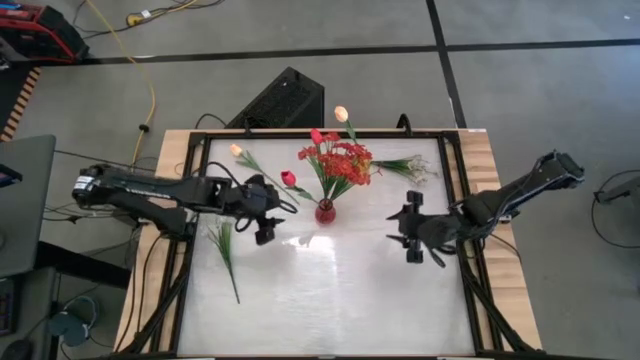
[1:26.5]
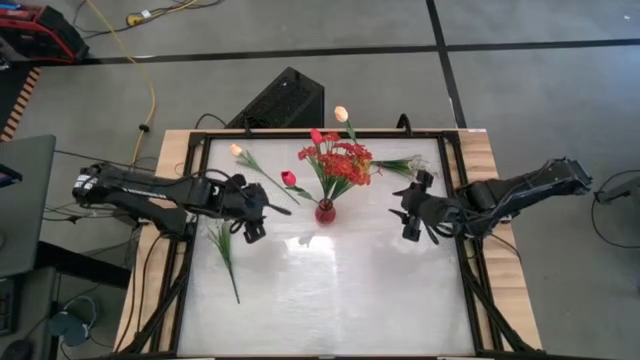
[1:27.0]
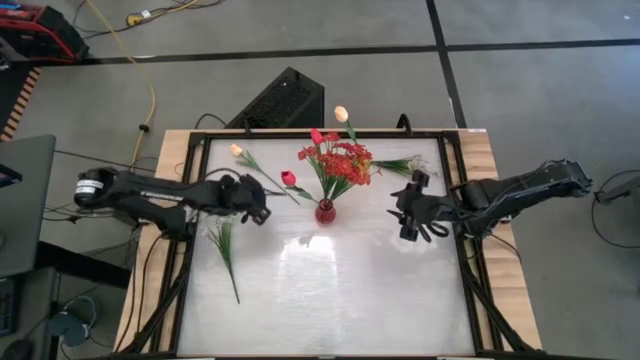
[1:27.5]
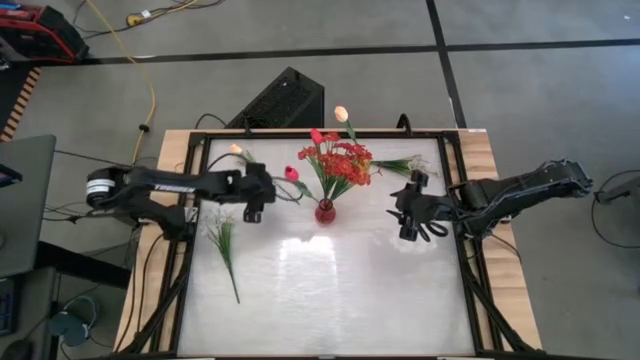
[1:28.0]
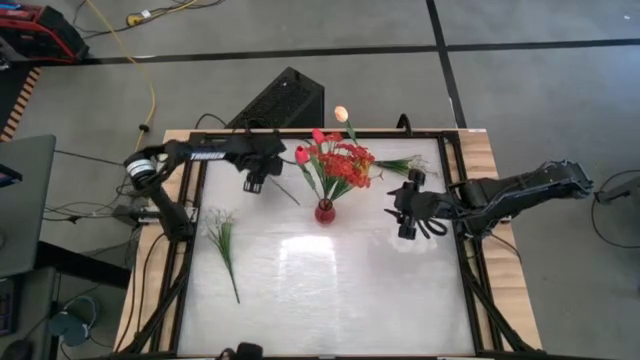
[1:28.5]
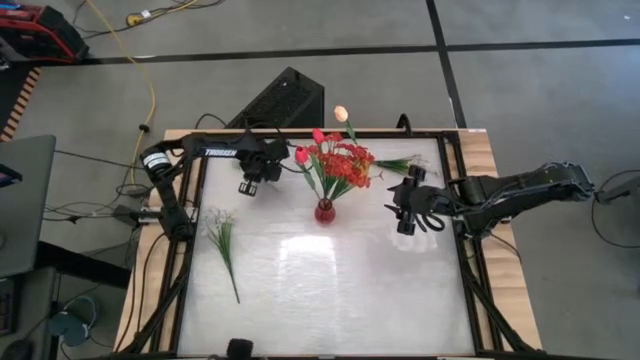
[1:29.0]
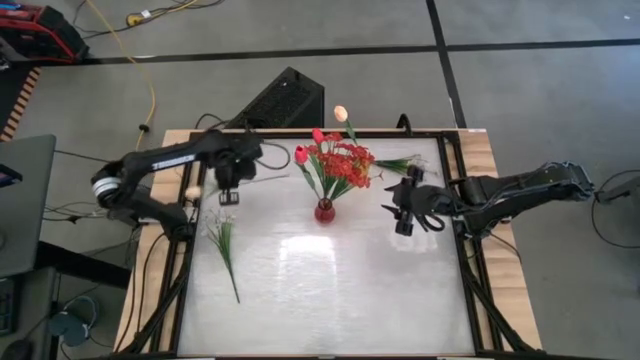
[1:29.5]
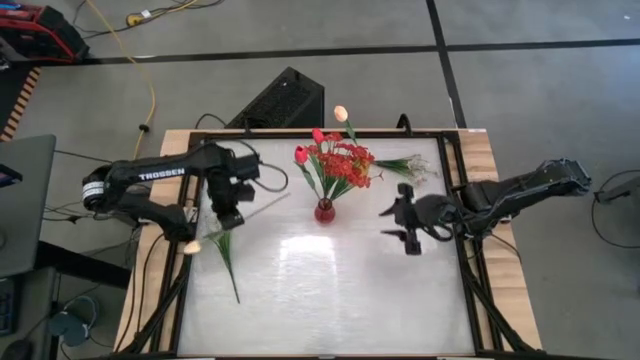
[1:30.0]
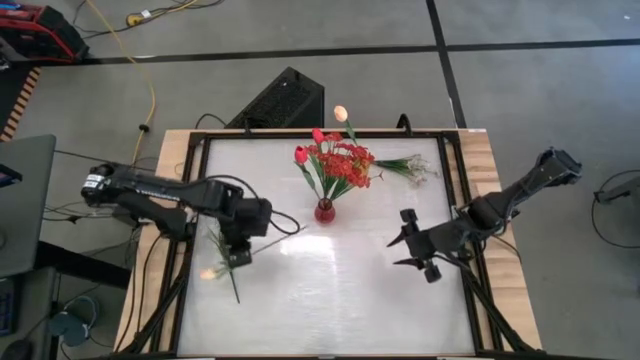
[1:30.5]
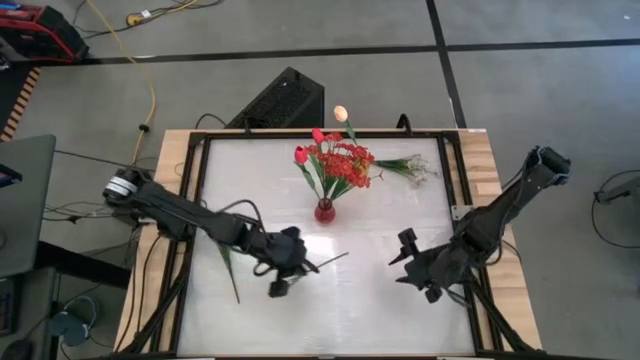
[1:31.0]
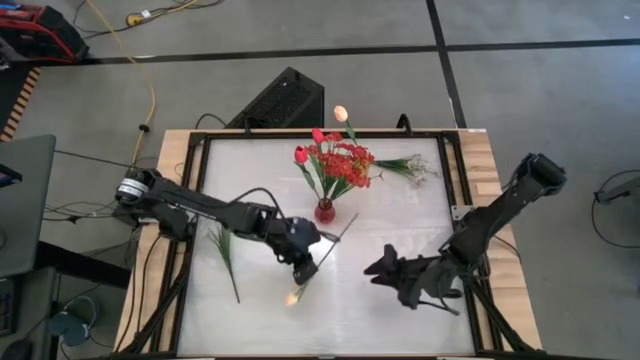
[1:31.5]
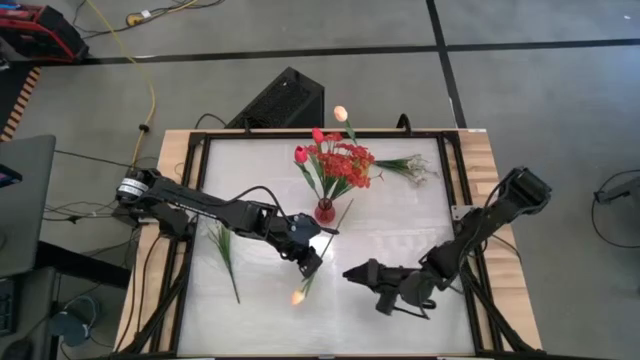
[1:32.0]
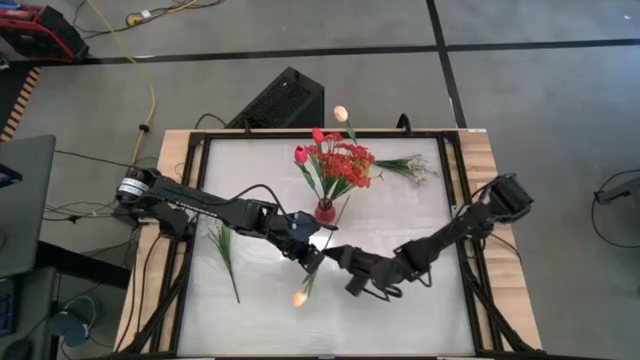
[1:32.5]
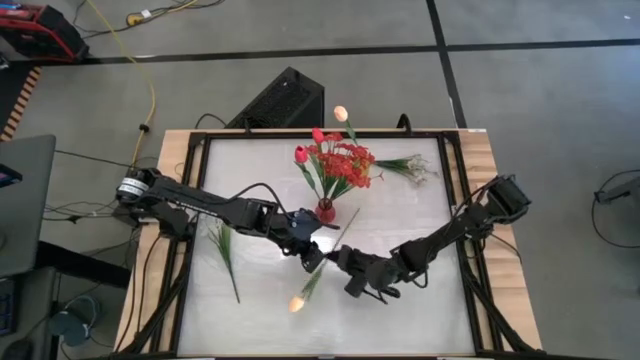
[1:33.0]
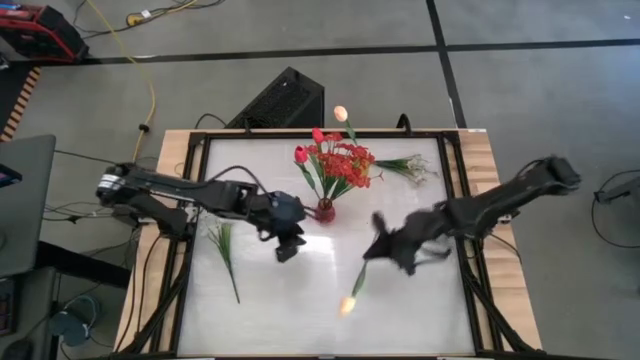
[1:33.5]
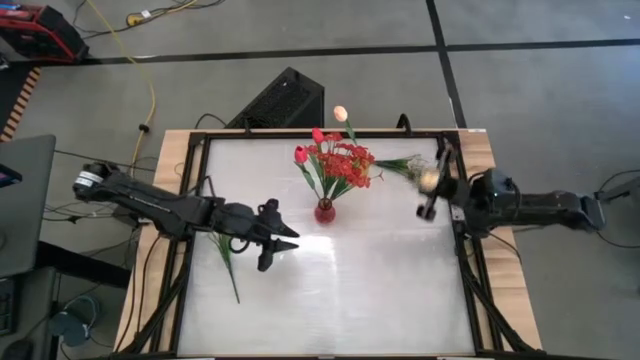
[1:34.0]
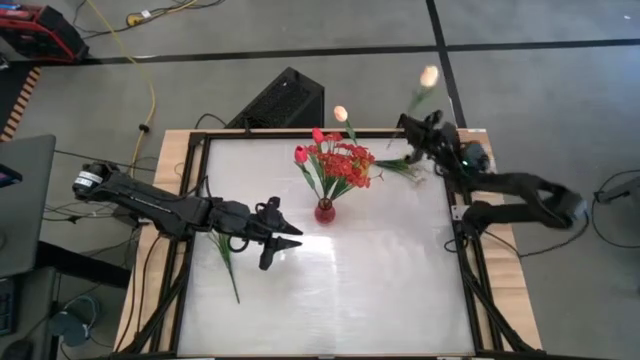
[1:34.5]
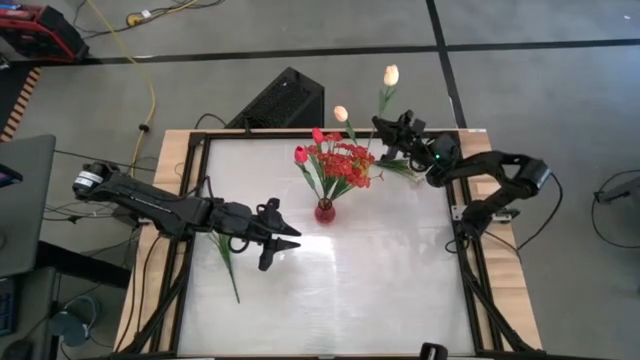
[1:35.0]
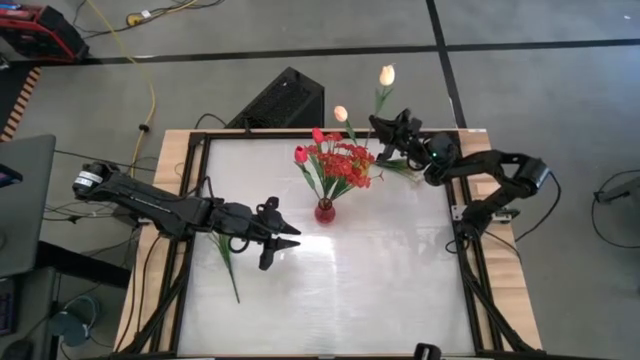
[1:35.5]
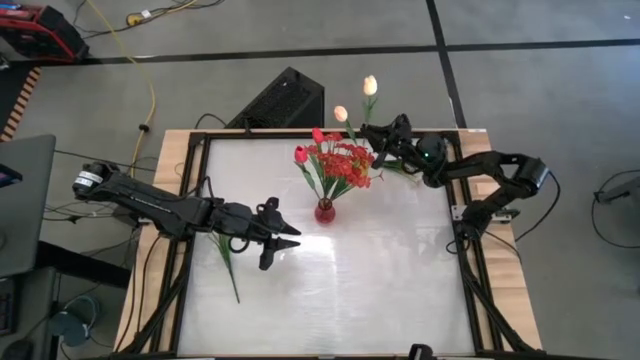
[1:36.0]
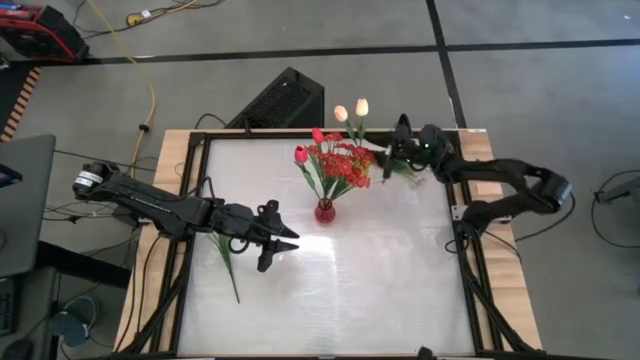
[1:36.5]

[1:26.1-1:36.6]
Task: Sort flowers into vase by color
Put the white tulip into the yellow vase

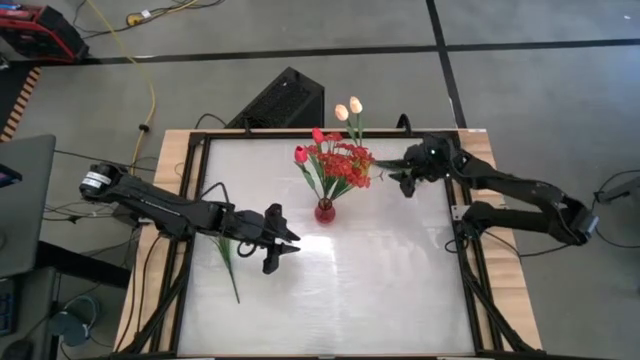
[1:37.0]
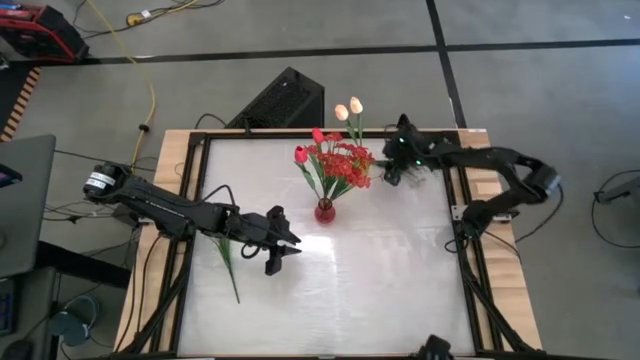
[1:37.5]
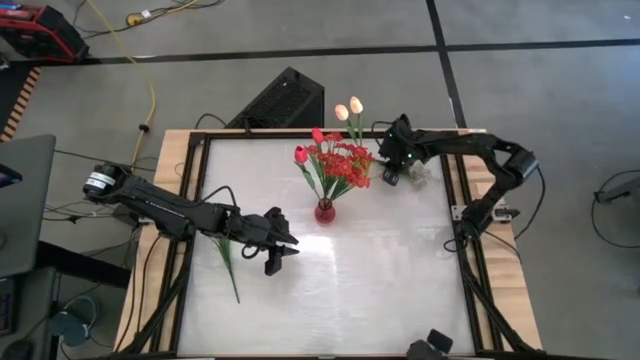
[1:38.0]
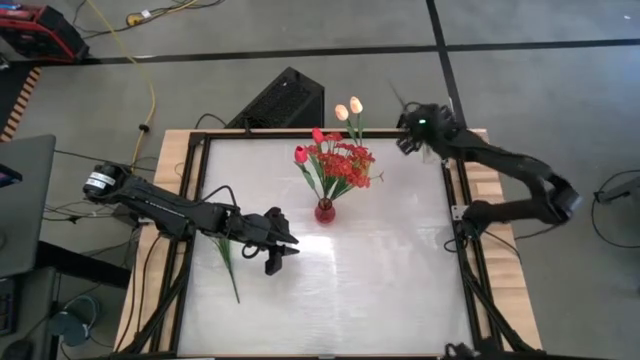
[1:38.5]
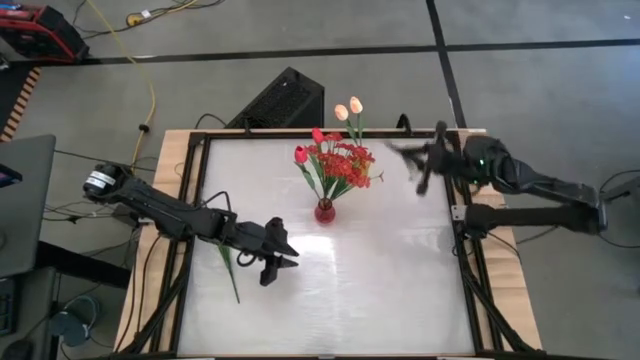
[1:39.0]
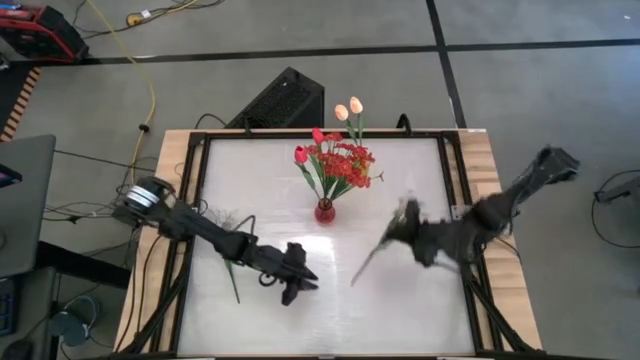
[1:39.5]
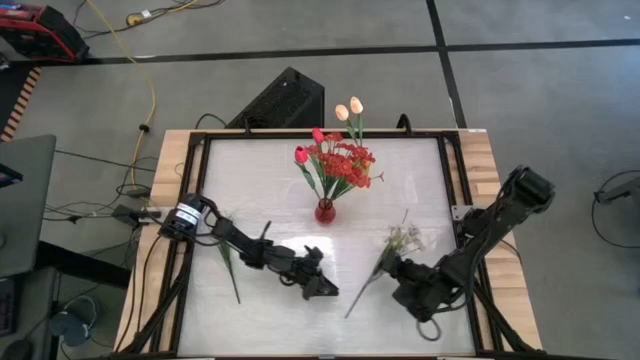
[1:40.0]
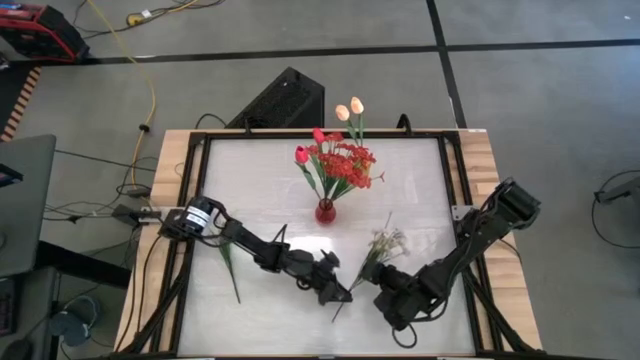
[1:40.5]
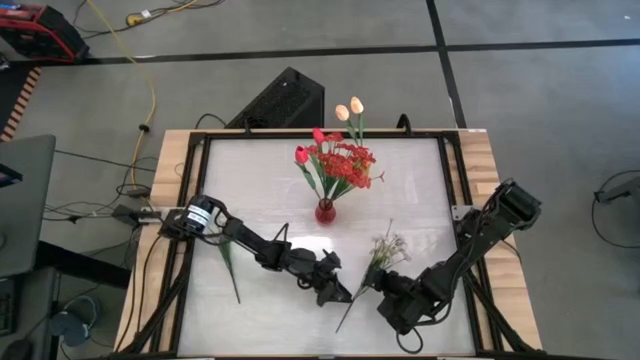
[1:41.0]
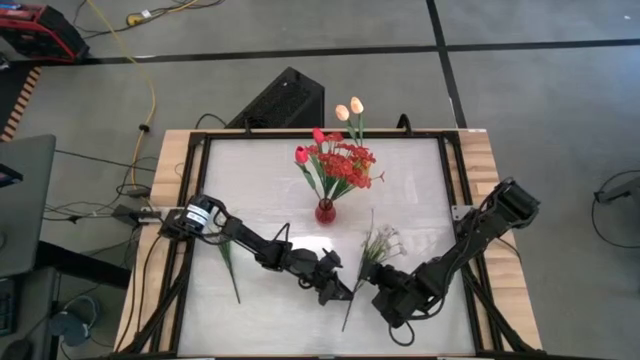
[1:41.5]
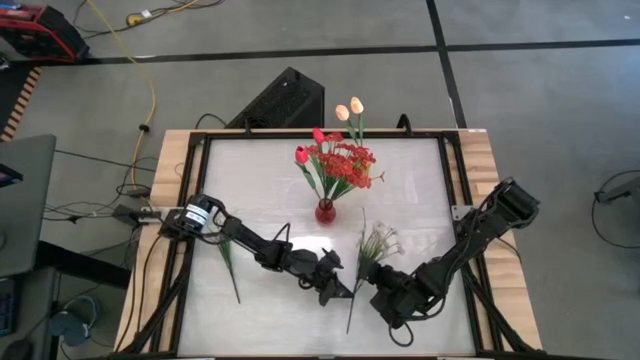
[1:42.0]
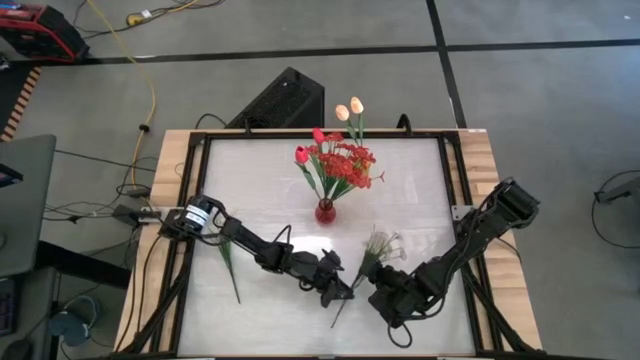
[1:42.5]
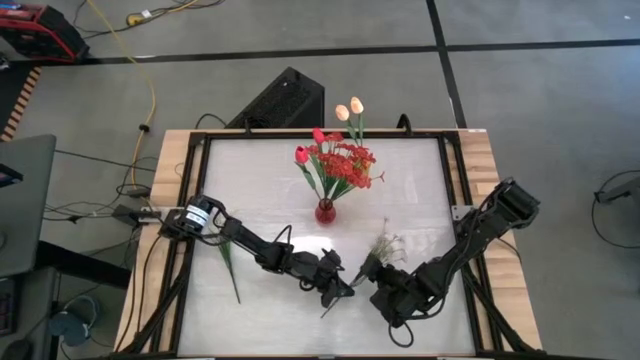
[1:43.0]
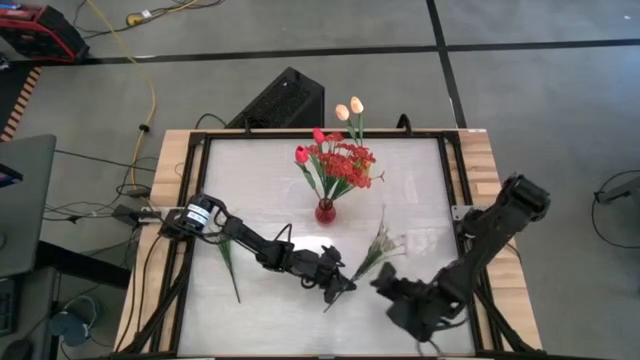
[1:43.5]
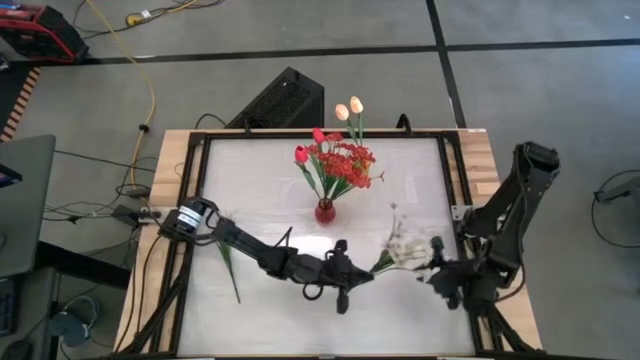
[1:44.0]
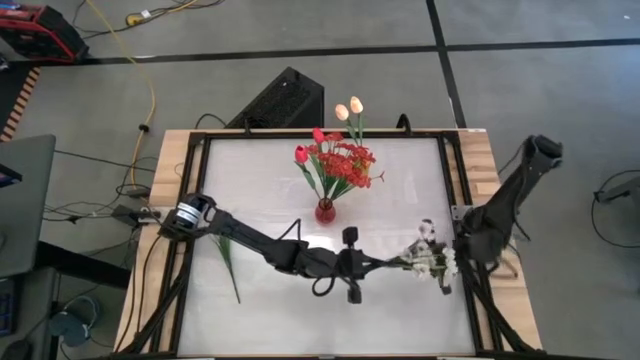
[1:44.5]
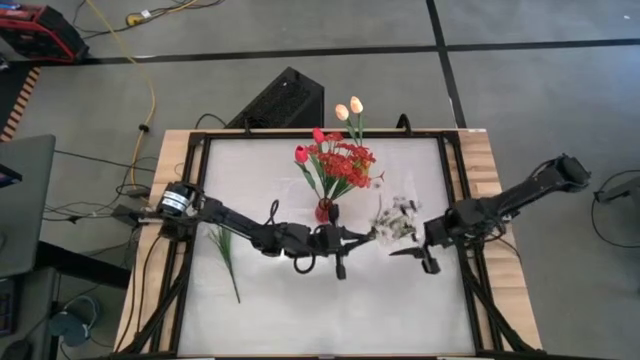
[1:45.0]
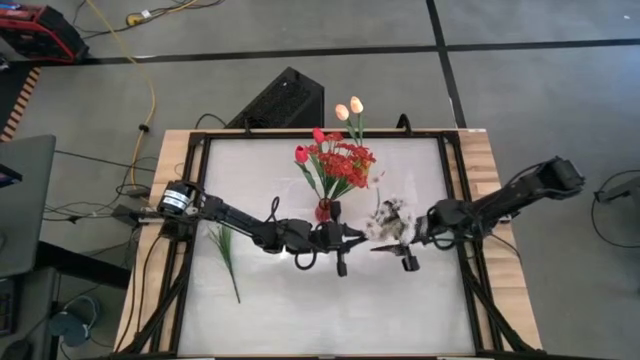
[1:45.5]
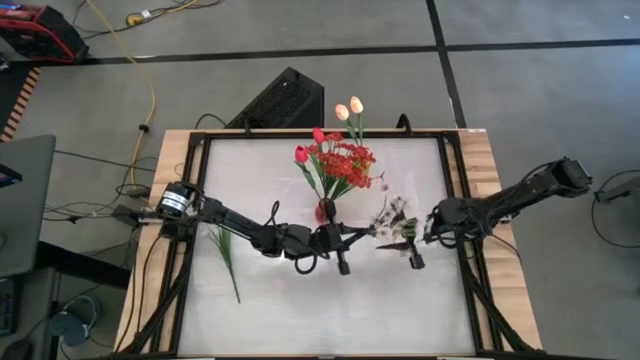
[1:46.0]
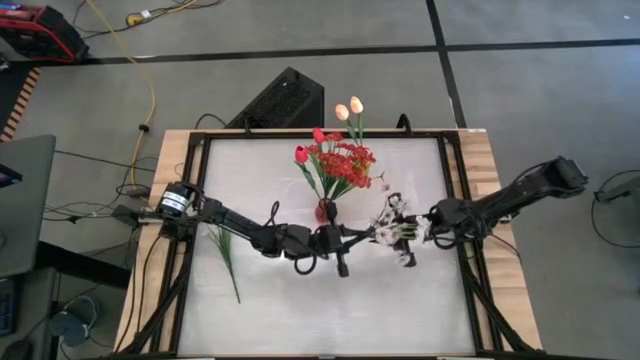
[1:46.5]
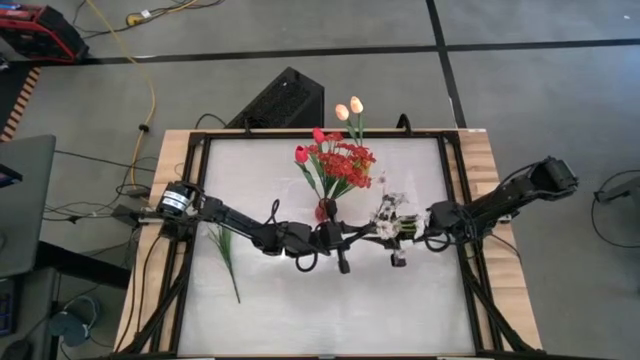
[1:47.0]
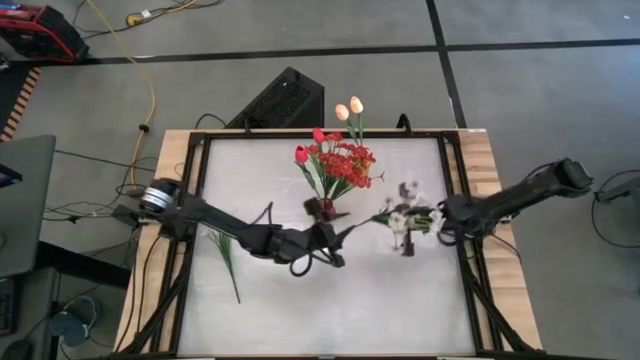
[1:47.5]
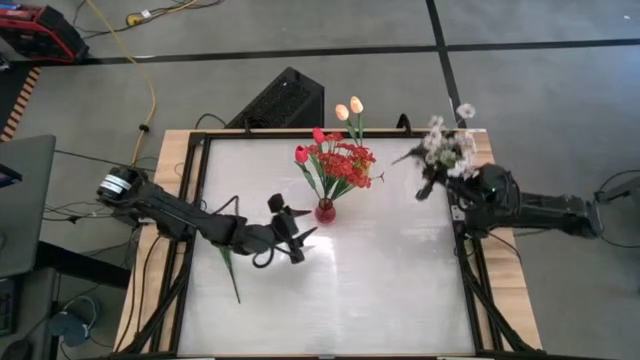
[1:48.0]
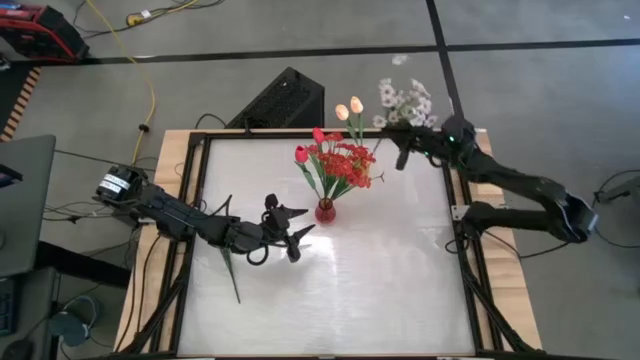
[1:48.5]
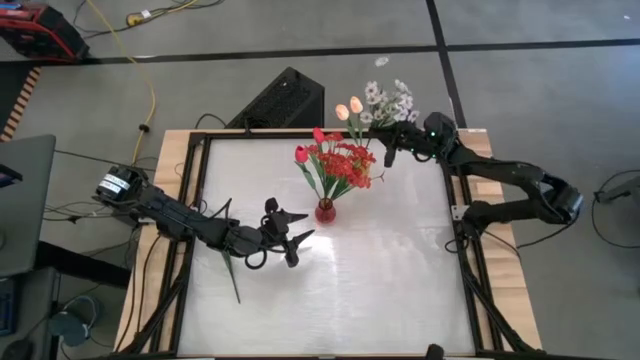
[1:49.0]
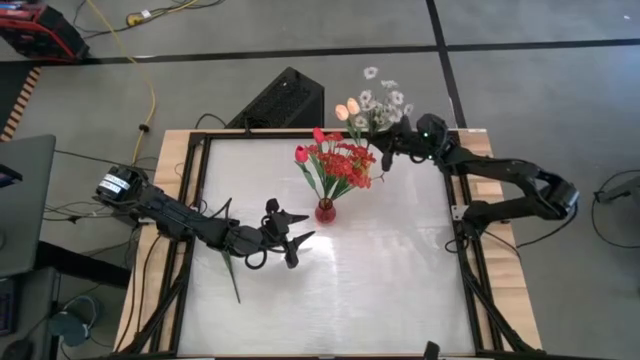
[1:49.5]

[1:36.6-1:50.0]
Put the right white flowers into the yellow vase
